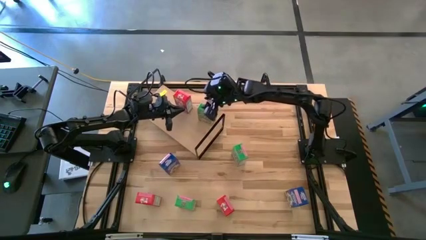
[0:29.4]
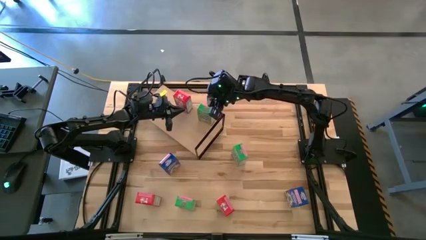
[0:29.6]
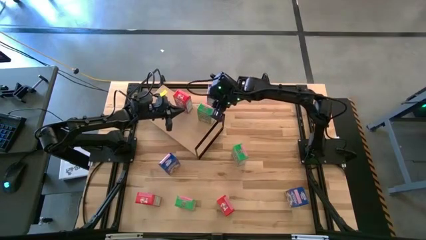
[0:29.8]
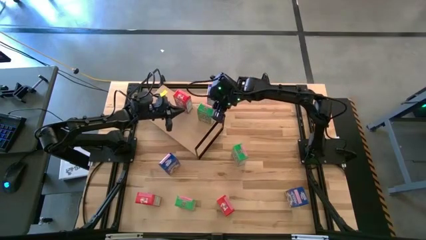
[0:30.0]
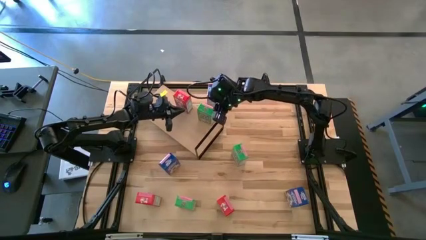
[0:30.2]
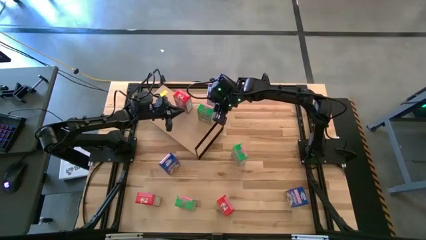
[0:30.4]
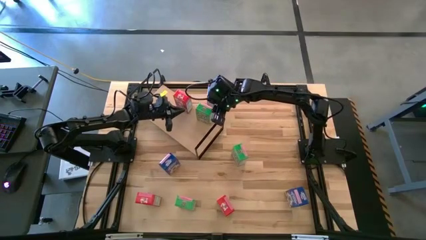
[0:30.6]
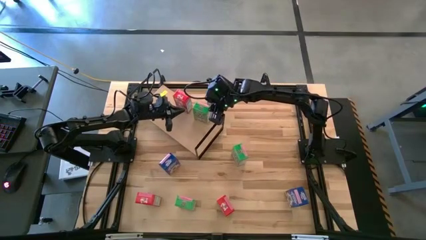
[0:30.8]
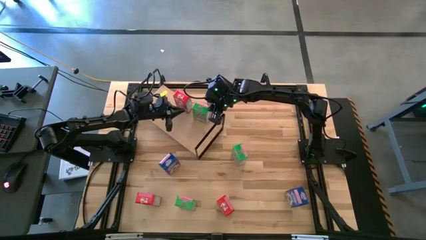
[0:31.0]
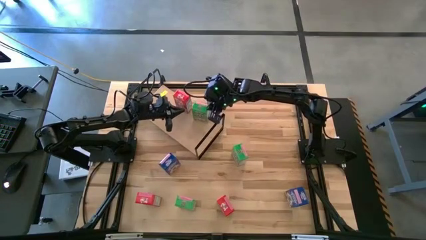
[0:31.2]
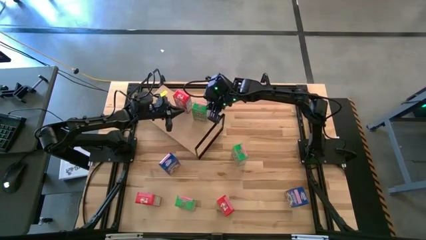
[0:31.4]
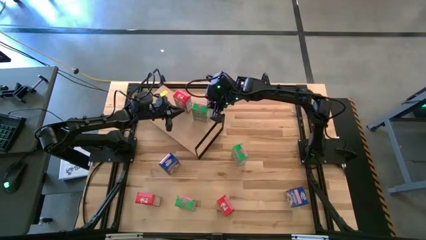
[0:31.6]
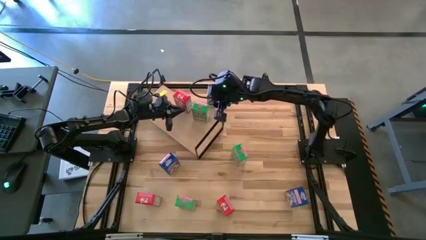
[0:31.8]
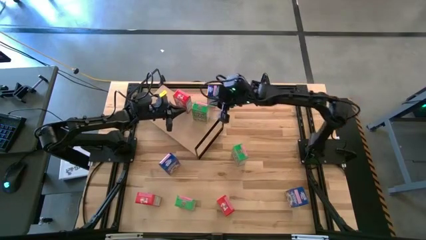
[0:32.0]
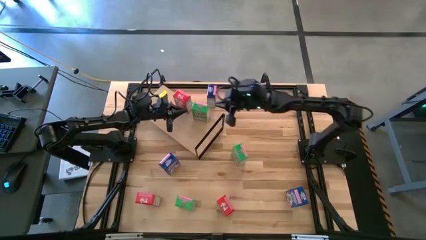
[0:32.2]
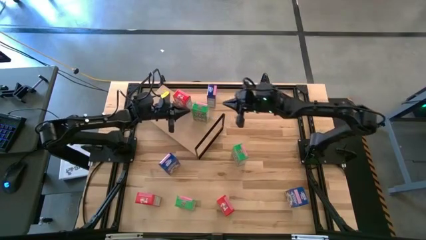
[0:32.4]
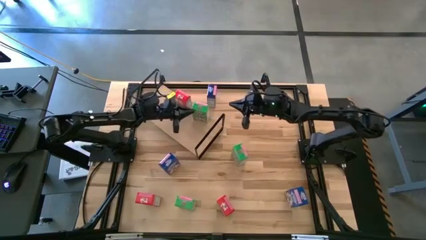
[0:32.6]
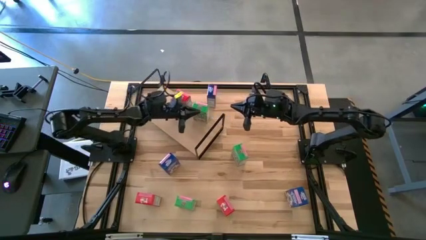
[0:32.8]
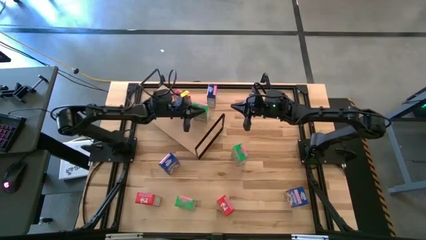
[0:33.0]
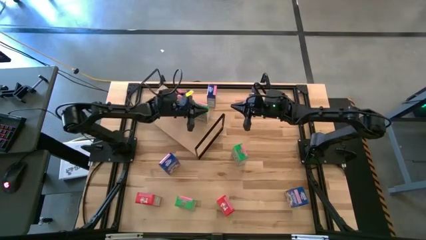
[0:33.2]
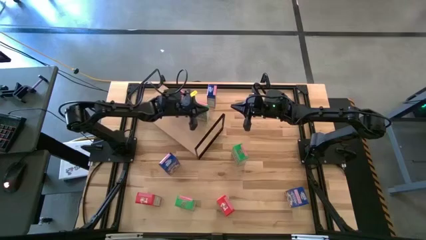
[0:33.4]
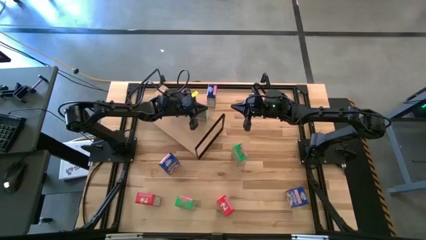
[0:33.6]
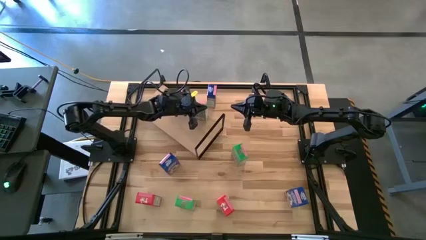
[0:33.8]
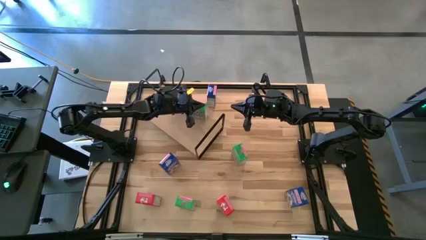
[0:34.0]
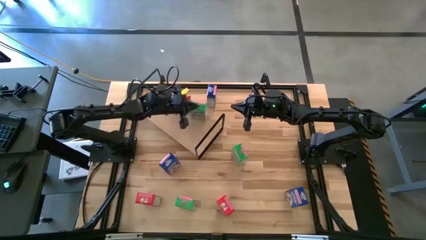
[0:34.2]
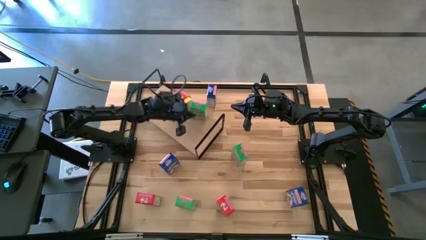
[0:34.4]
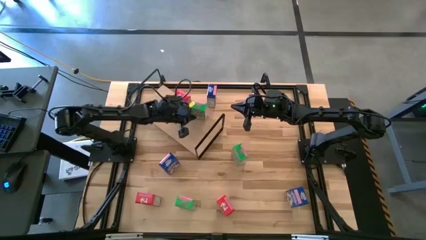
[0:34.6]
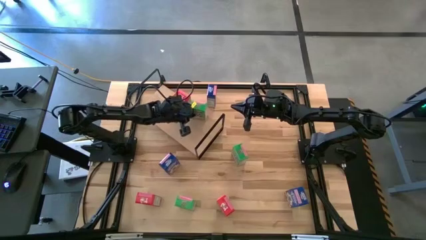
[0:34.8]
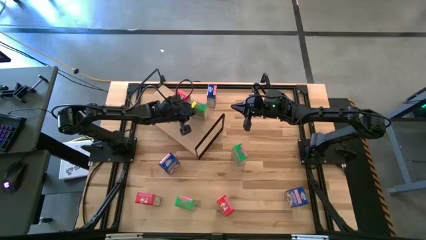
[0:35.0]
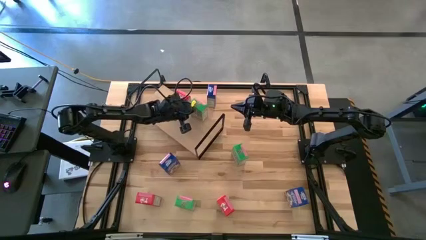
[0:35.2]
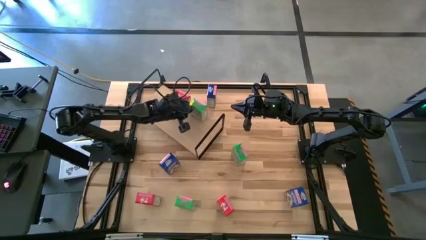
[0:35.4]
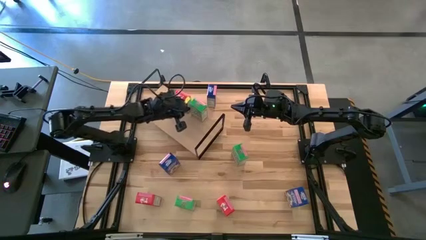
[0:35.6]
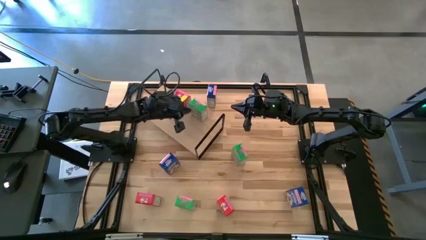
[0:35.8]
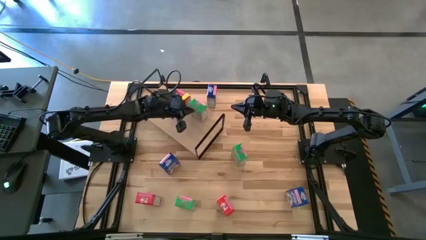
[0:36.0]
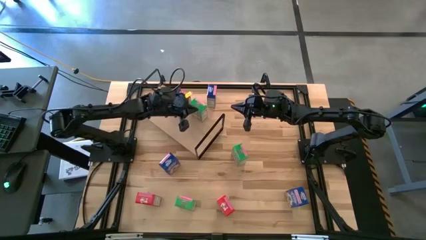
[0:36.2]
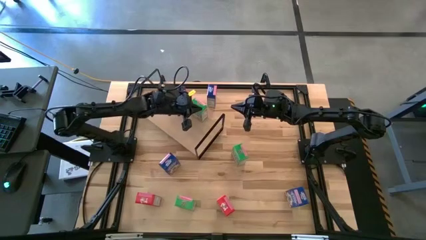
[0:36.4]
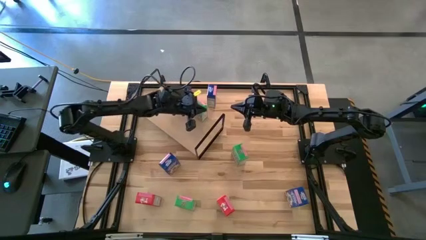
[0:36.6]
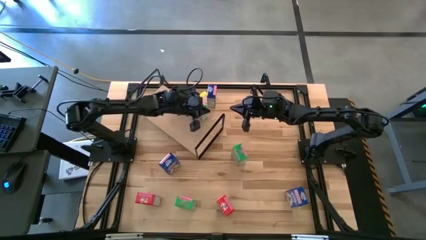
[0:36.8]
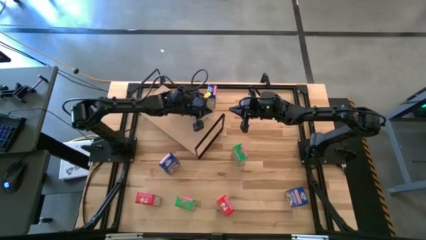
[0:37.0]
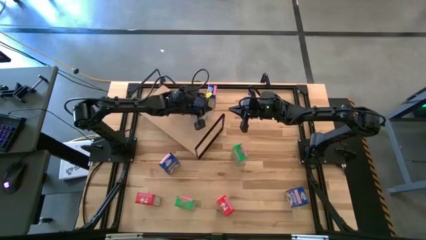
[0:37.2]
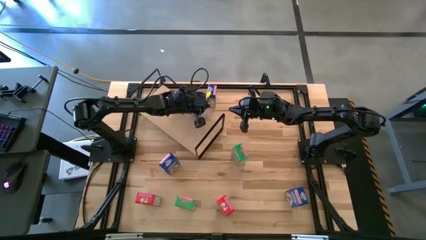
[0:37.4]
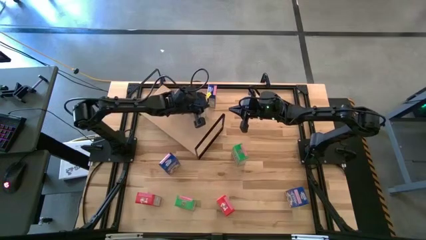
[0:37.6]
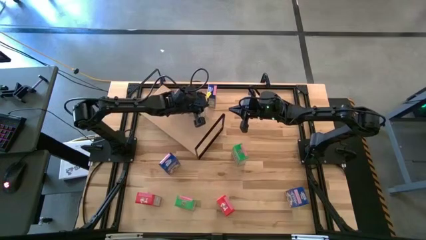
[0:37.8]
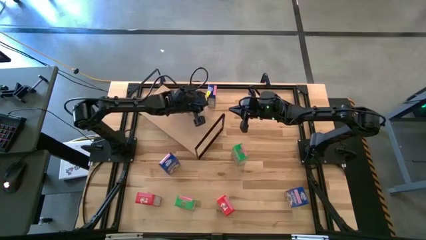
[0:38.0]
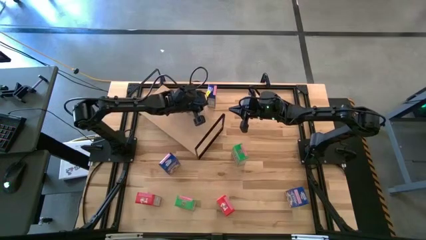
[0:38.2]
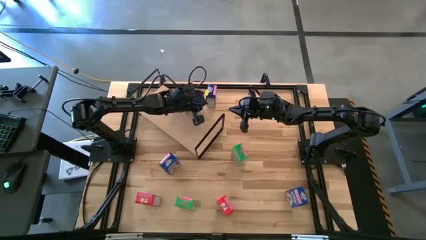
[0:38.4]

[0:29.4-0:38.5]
Task: Stack cereal on shelf
Adjust the green cereal on the shelf

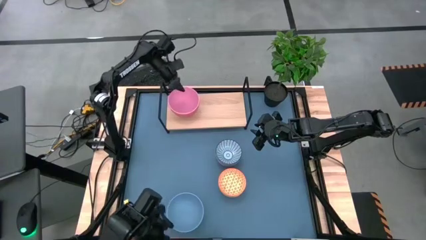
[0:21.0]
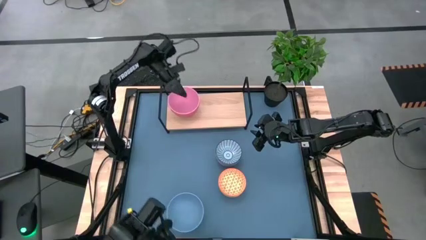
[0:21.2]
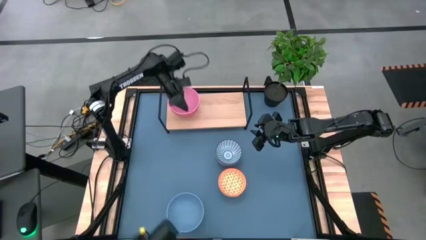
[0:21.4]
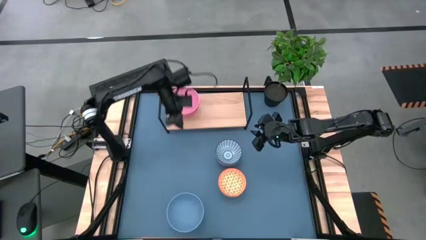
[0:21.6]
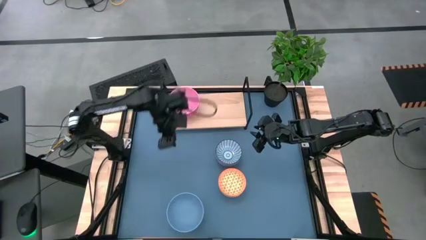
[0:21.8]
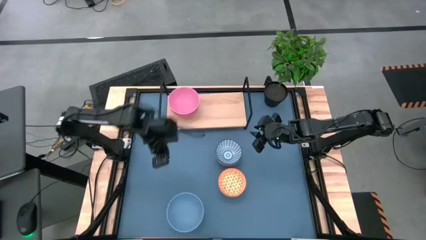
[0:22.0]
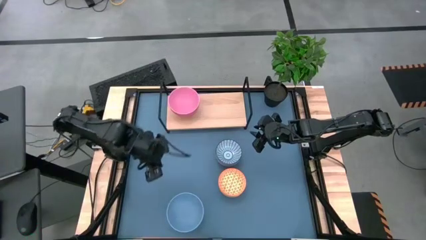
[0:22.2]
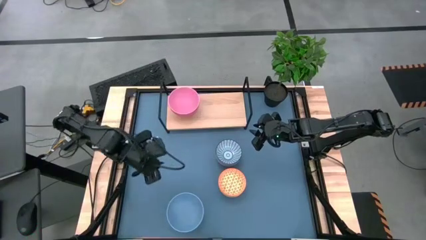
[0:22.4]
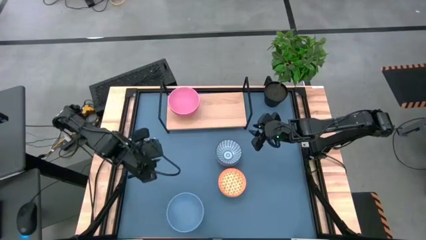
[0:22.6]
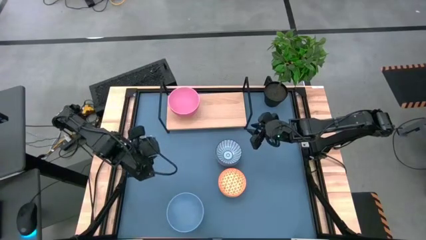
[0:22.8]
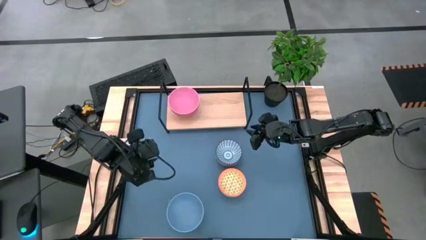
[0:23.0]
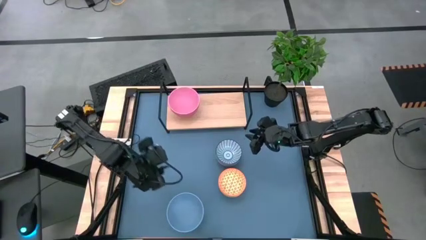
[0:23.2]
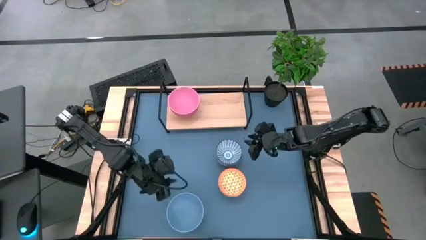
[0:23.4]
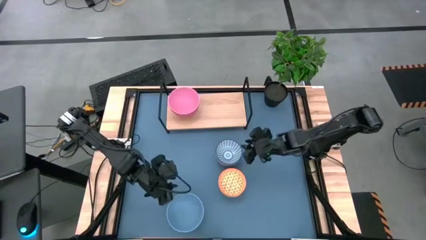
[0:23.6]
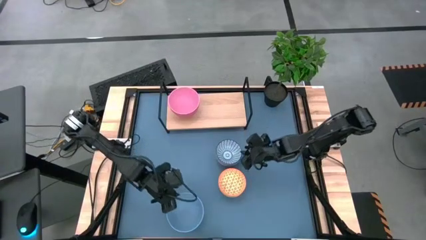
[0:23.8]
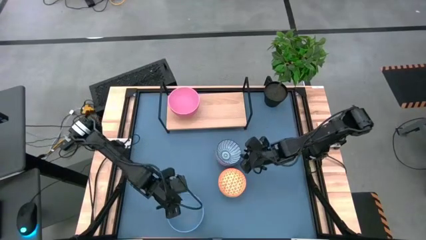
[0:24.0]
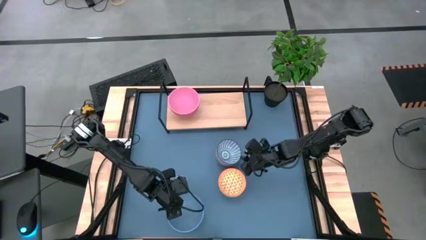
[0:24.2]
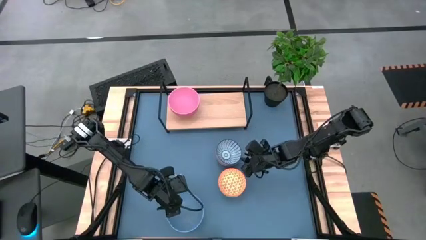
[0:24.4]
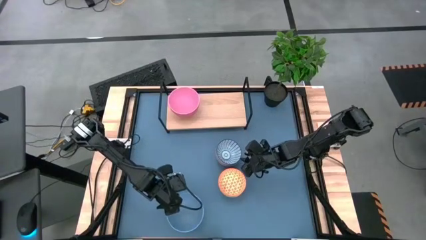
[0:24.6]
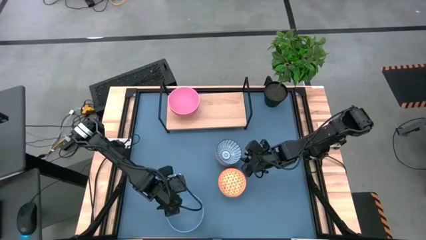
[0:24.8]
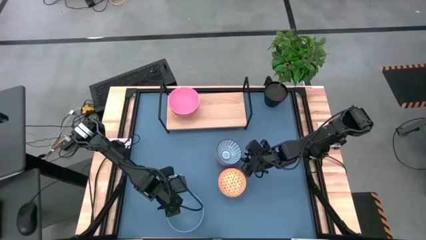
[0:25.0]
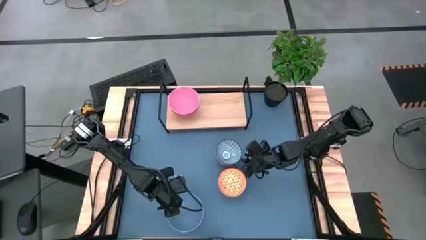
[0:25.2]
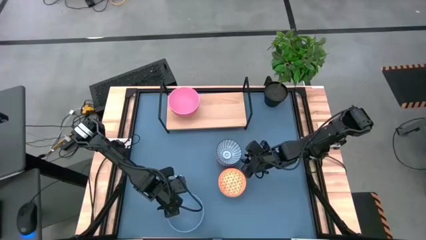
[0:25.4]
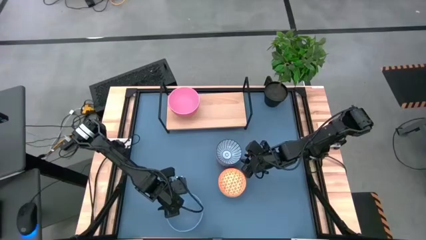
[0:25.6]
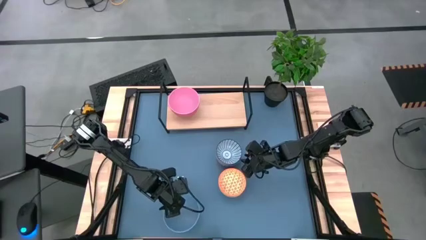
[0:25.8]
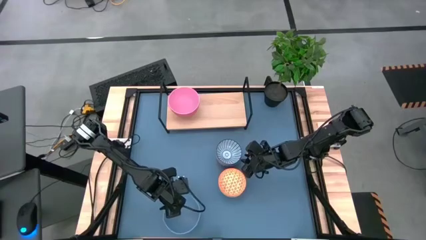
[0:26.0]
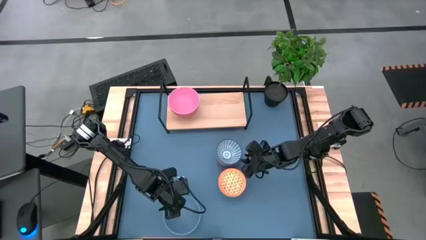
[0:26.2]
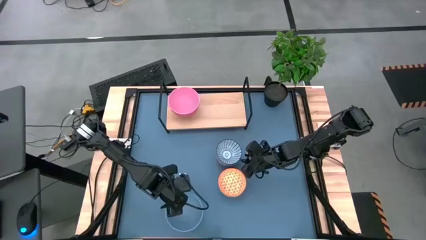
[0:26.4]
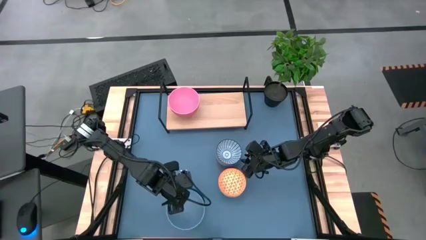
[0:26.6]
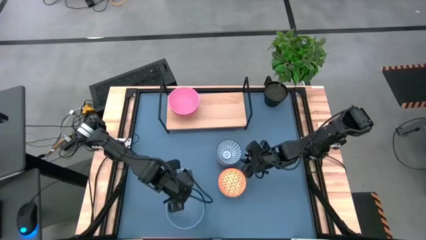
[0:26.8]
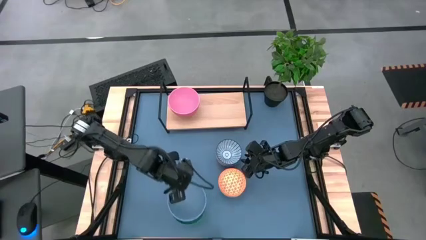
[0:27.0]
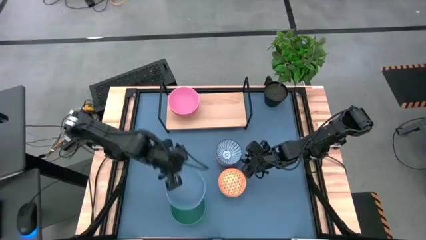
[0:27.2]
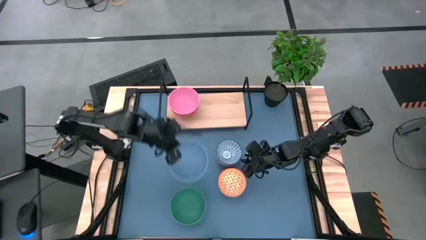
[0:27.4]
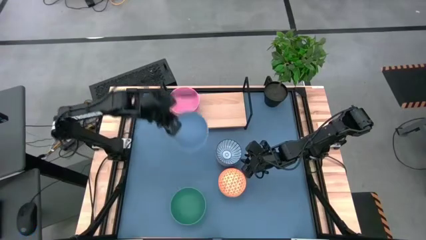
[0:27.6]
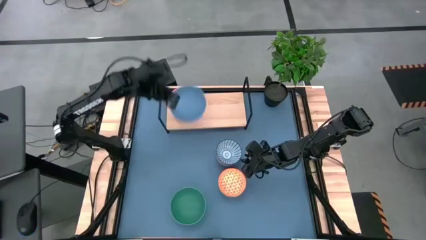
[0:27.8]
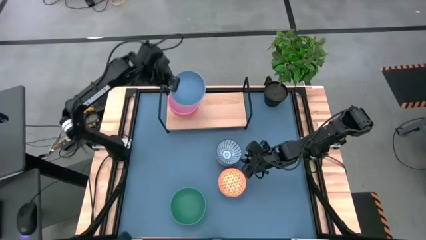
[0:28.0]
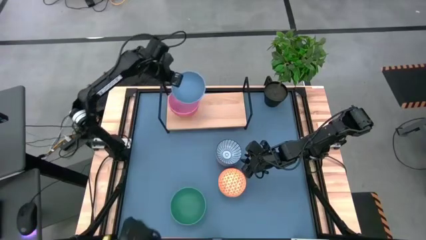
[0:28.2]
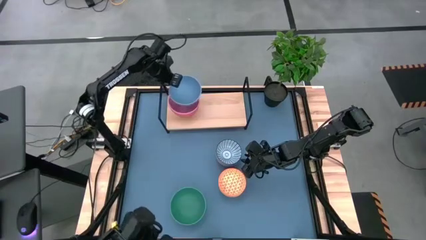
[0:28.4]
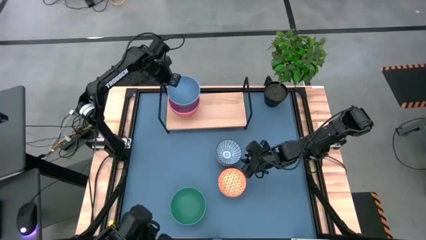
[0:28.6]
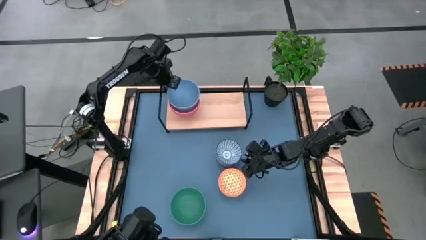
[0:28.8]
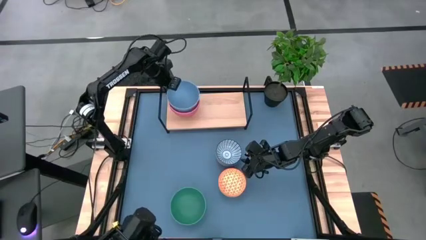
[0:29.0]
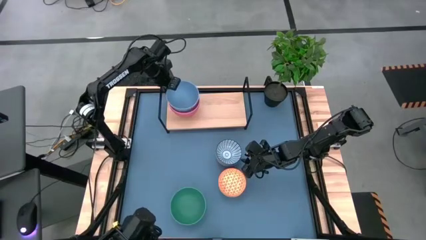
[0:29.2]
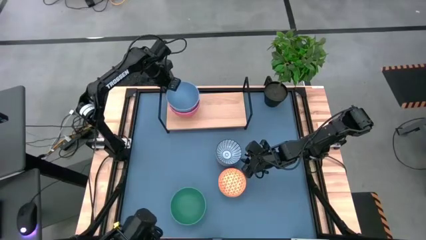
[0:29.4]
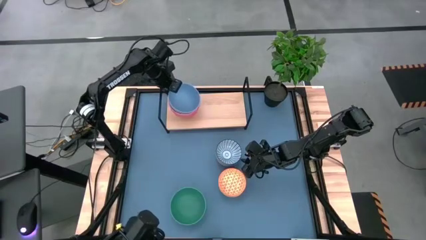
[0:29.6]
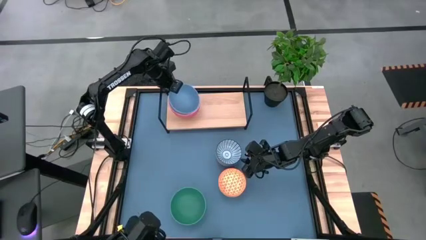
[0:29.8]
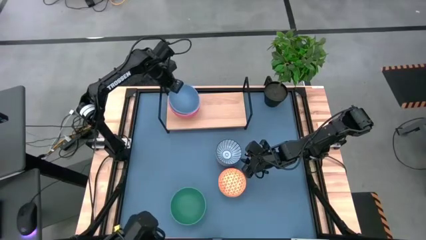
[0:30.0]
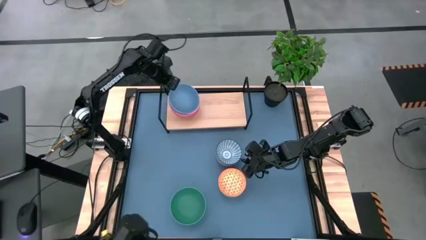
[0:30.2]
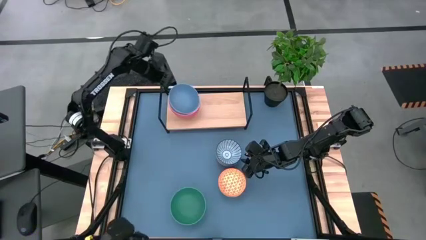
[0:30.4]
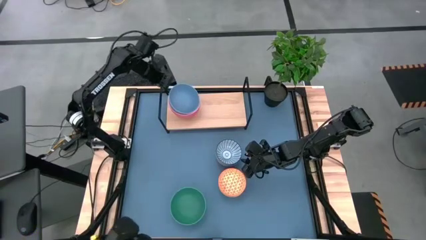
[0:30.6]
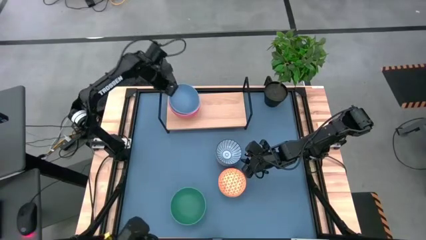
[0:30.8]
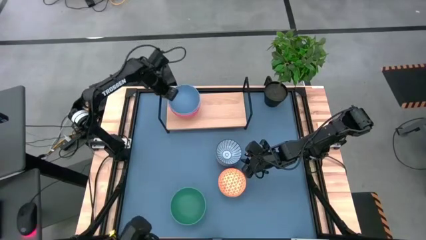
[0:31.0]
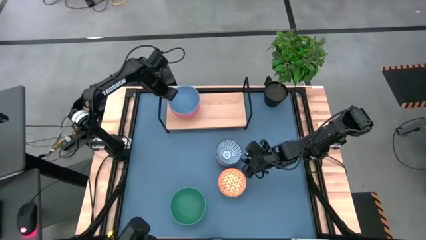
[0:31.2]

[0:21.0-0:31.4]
Task: Place and stack bowls onto a shelf
Stack the blue bowl on top of the pink bowl on the shelf
